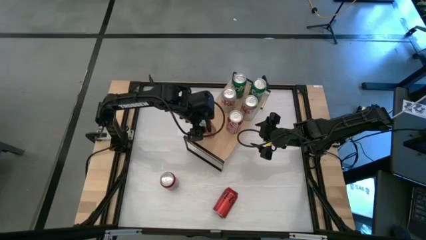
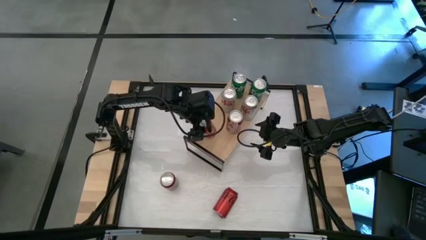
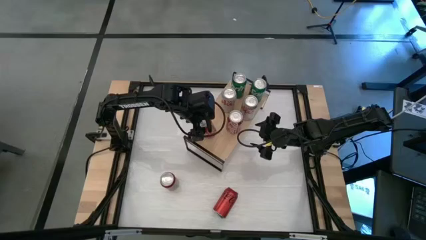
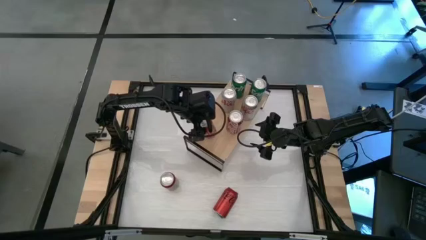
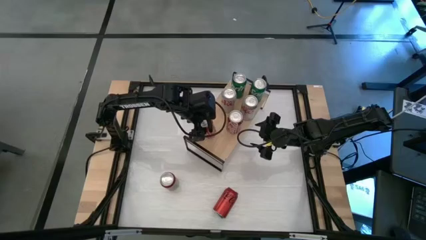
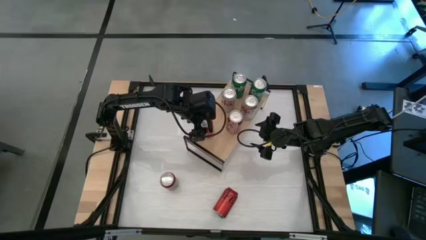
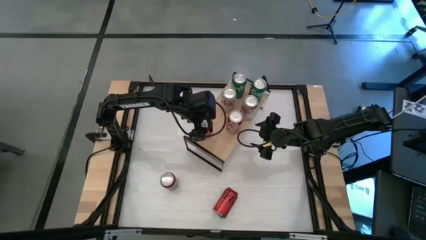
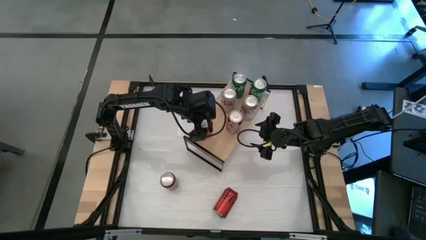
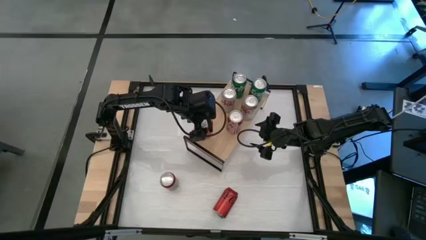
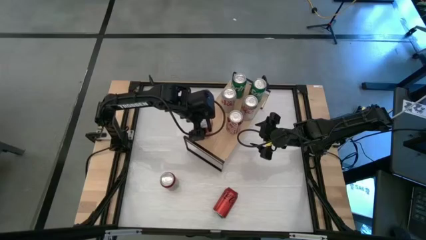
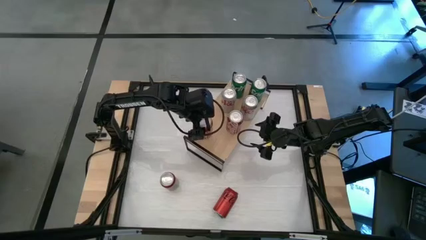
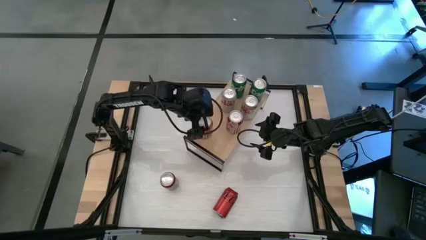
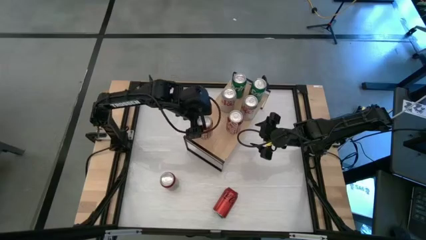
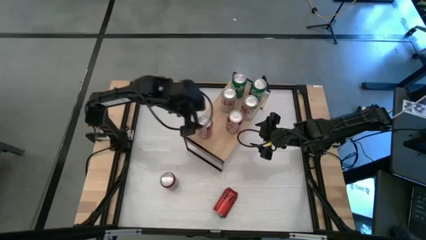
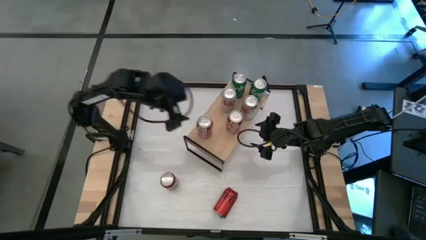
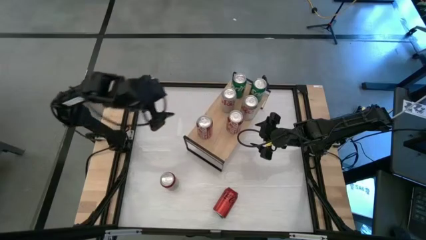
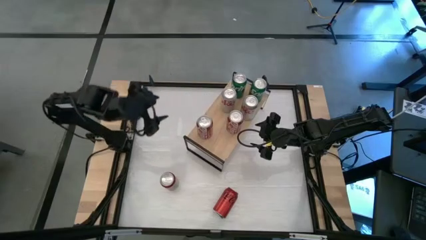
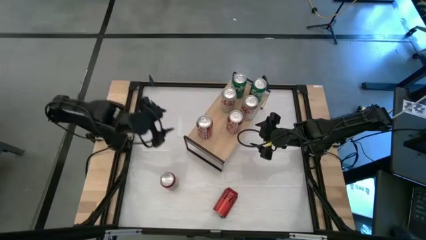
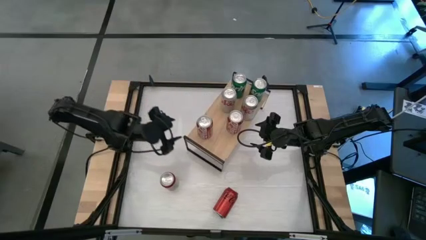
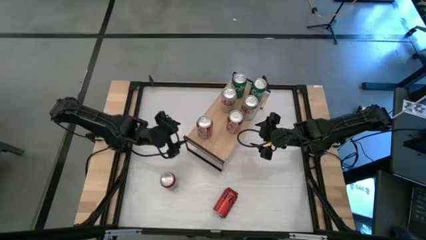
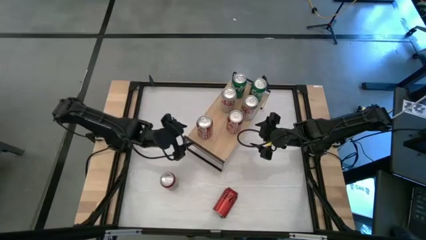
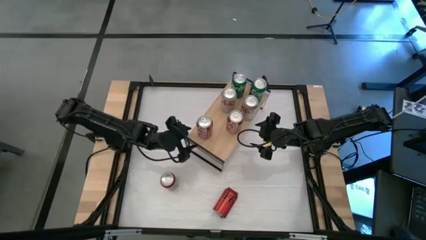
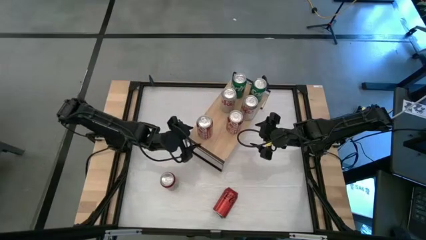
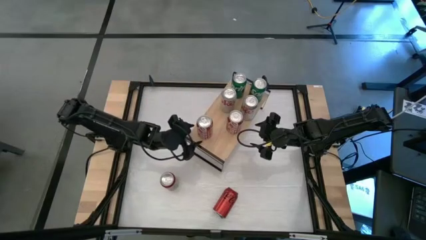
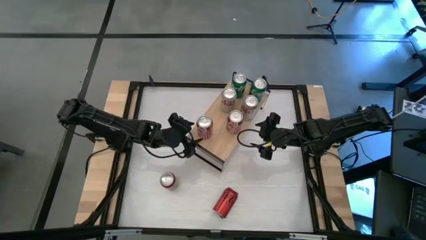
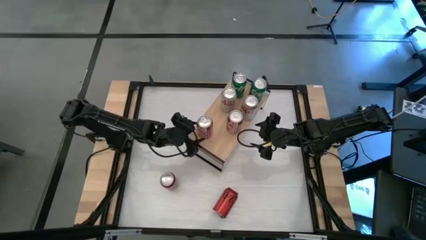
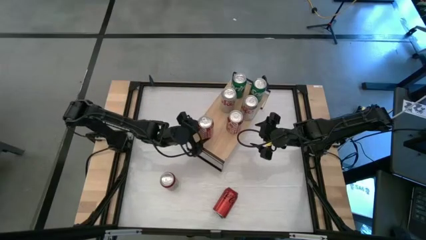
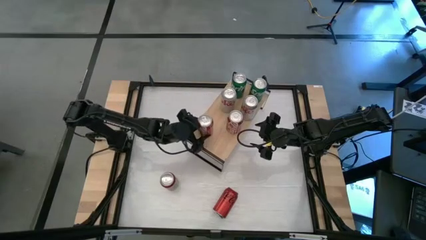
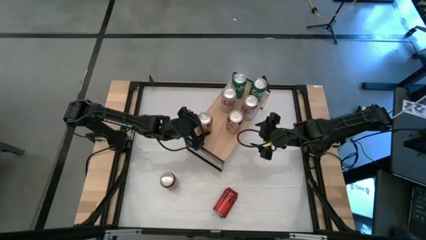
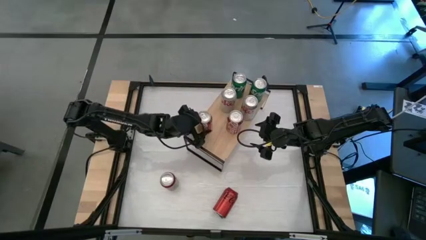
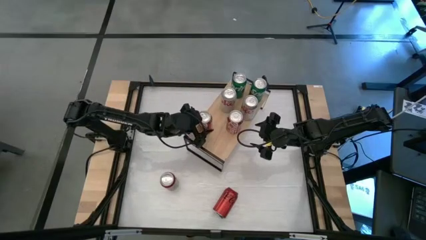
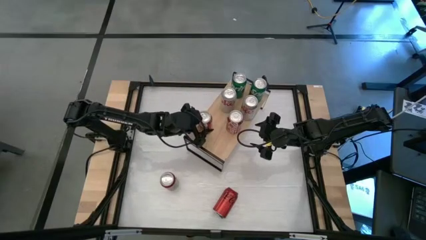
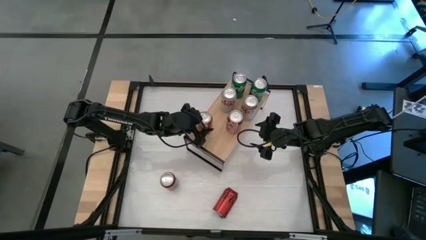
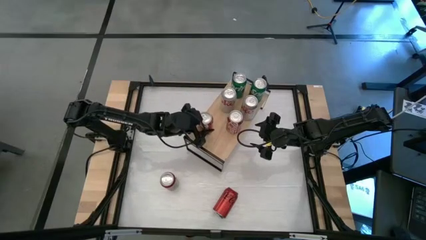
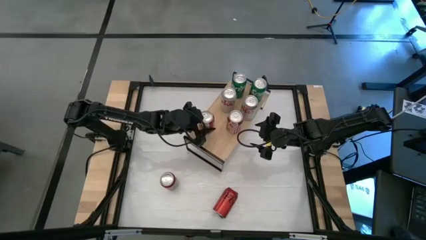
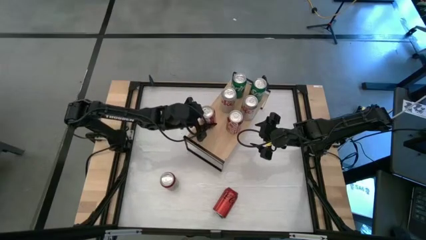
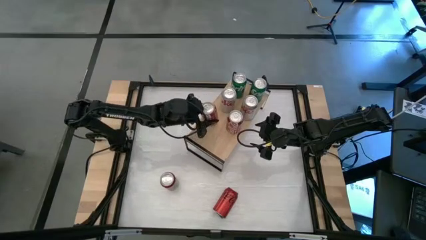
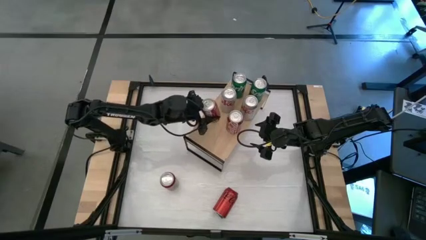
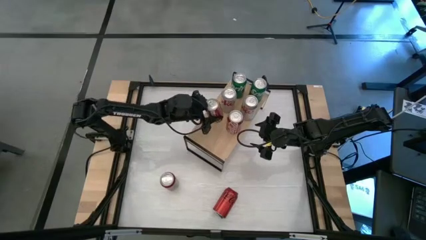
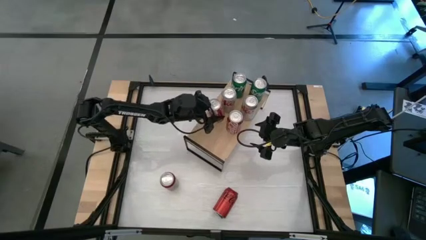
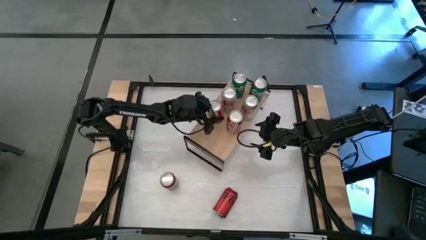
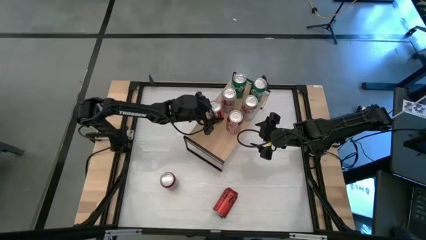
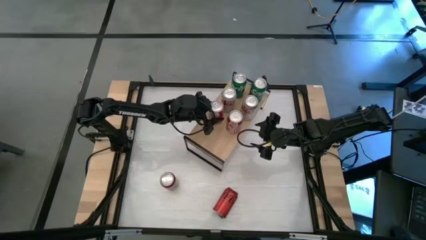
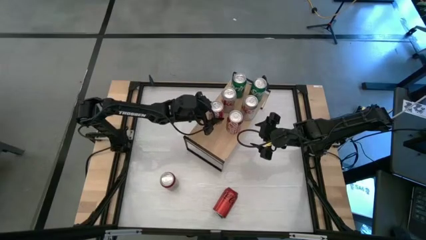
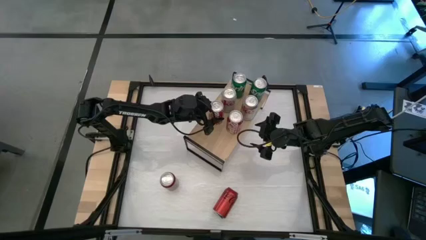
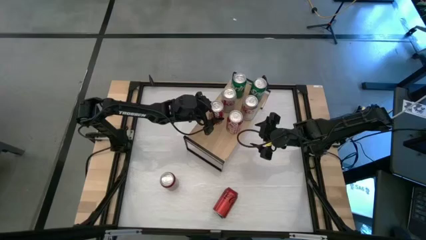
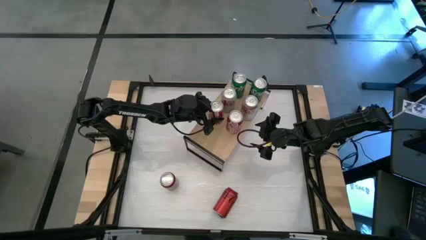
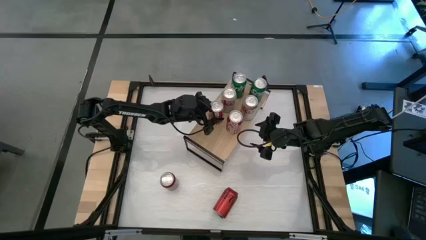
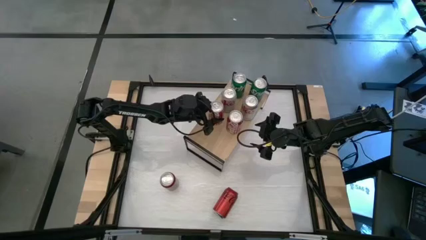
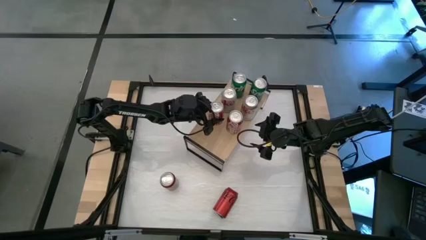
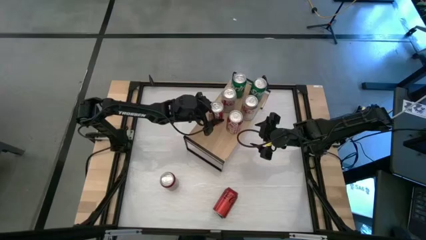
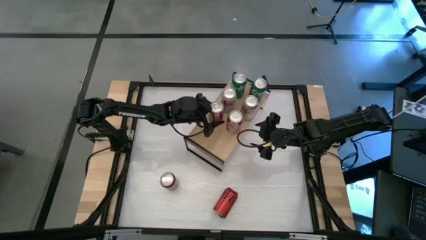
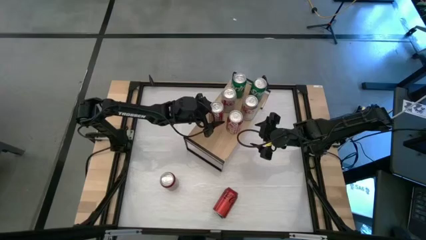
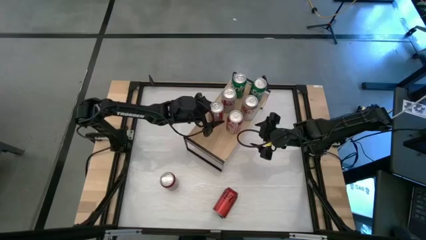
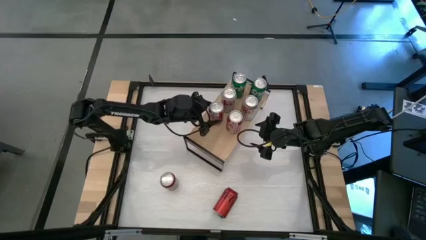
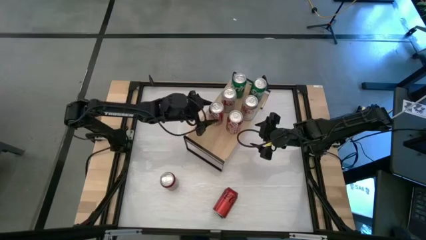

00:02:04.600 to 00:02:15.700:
Task: Place canned beverage on shelf
Put the red-white soda can on the shelf aligned with the other red-white soda can
